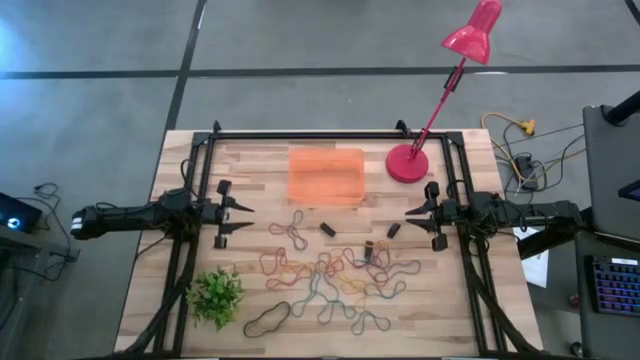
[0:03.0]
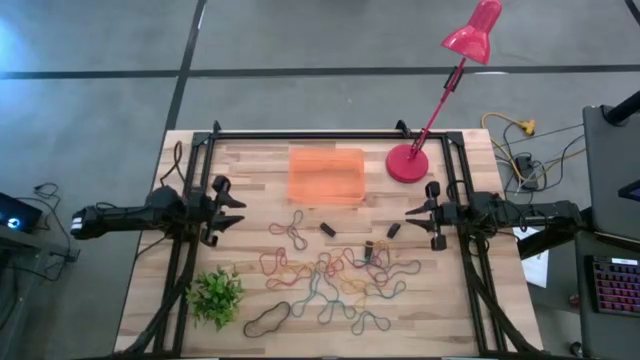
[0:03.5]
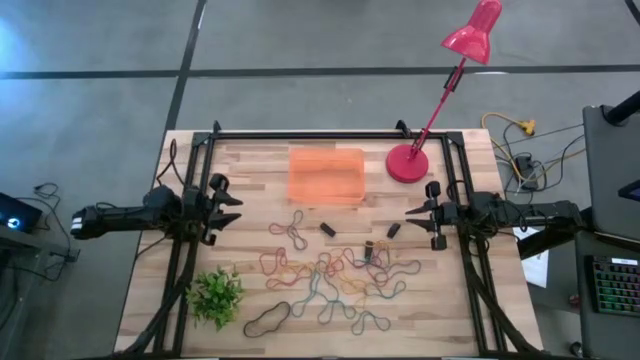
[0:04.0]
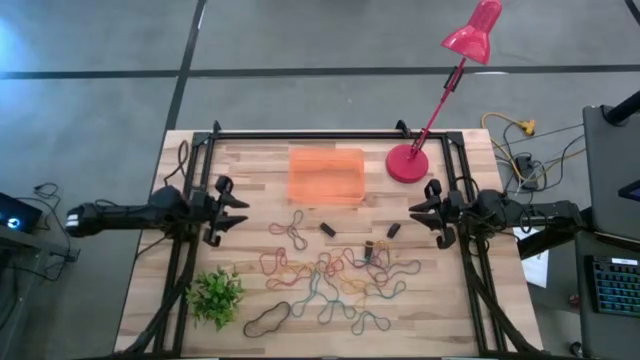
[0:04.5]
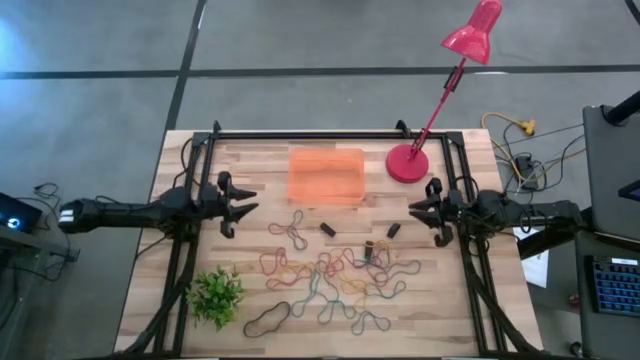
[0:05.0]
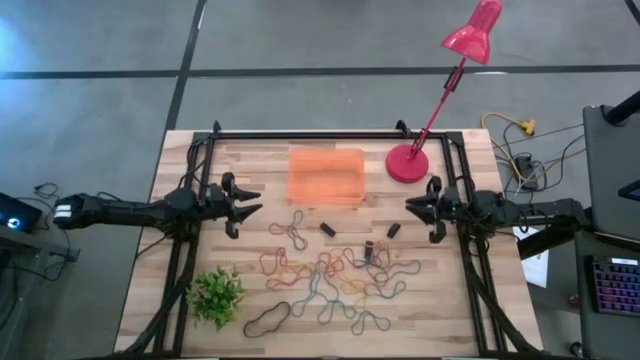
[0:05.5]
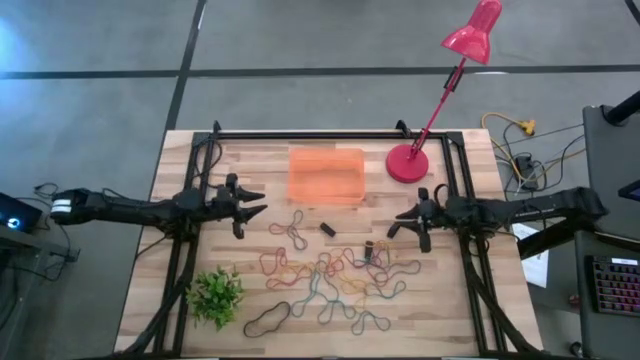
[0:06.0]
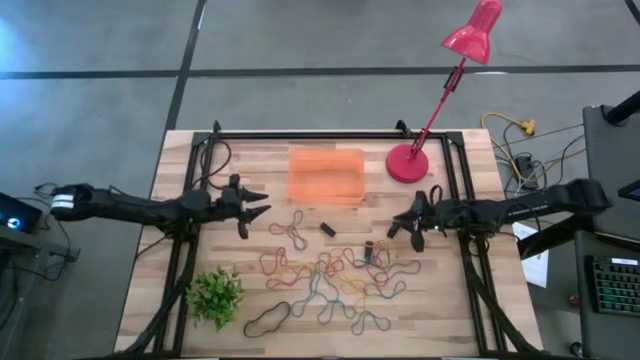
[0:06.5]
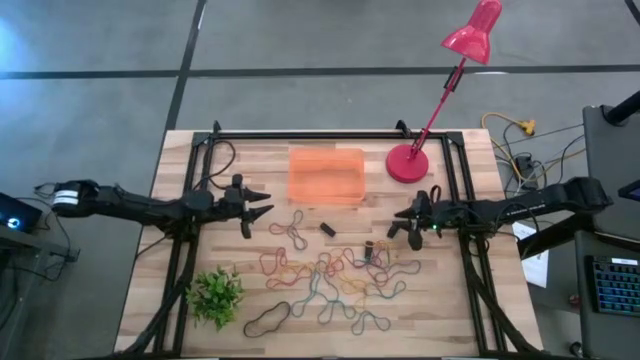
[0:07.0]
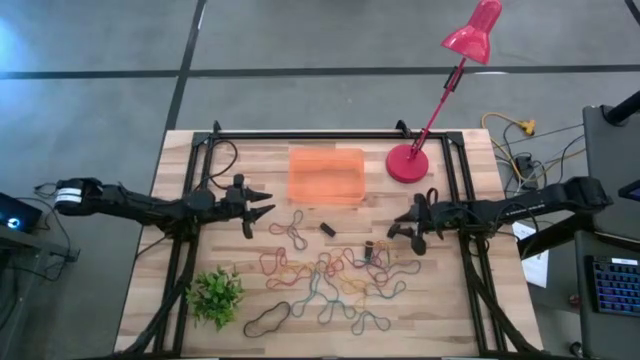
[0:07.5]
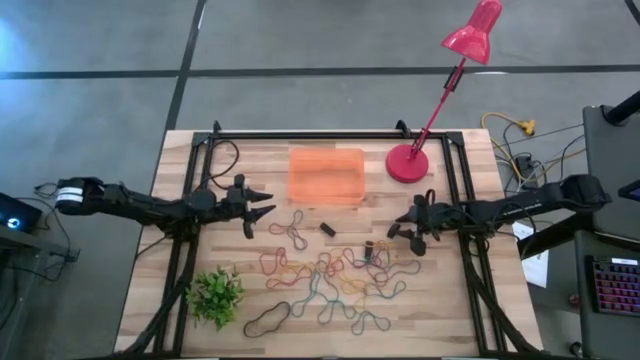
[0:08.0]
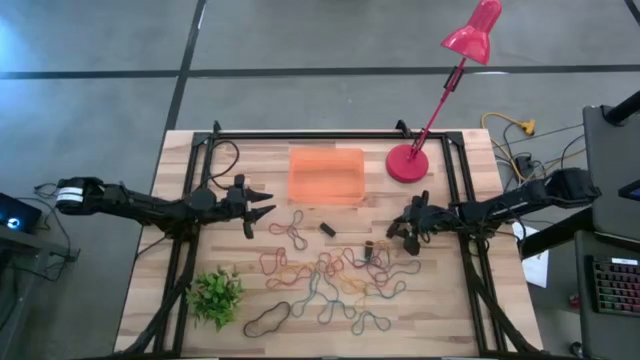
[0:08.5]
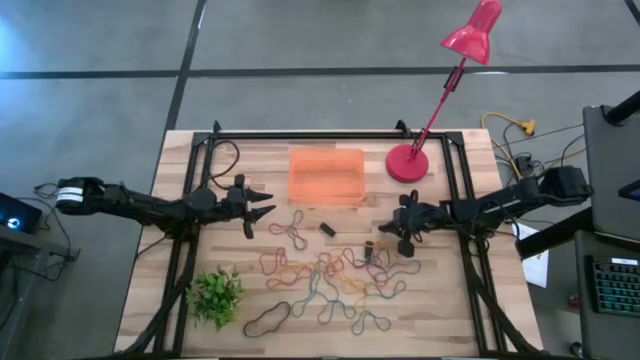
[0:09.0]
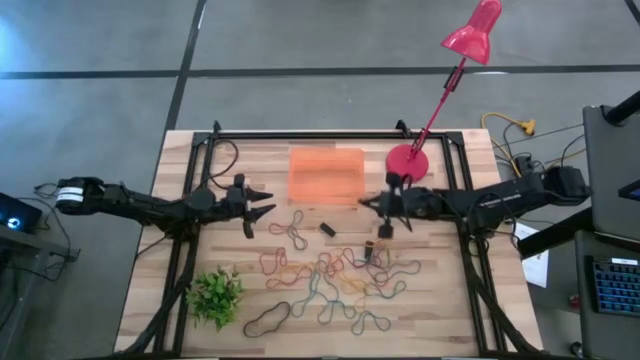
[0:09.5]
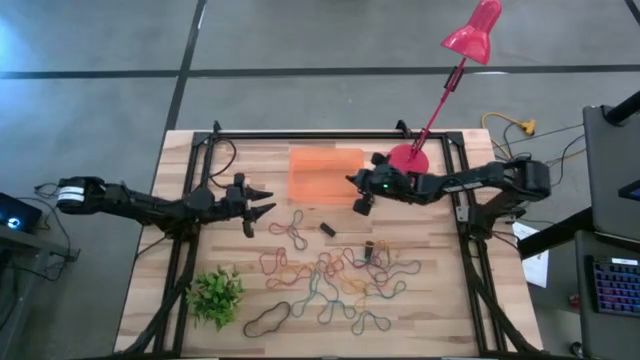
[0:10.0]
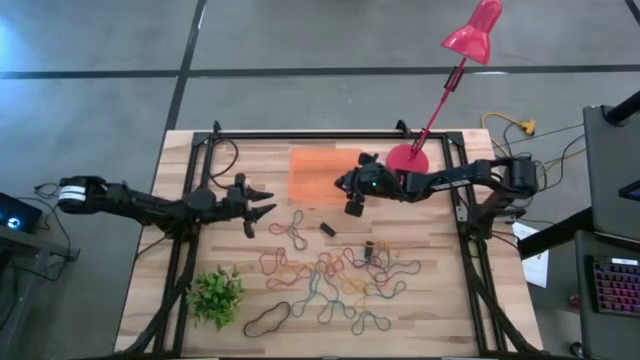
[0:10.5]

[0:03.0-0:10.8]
Task: Pick and place rubber bands into bin
Put the black rubber band into the orange bin

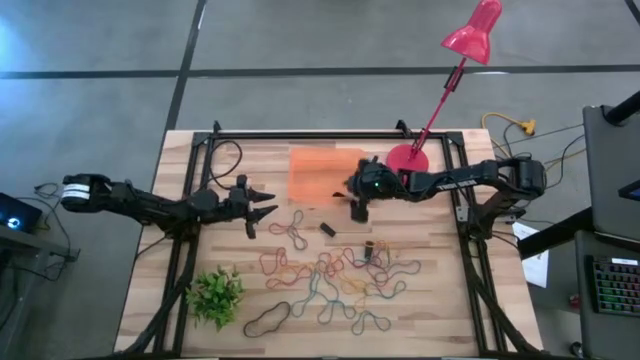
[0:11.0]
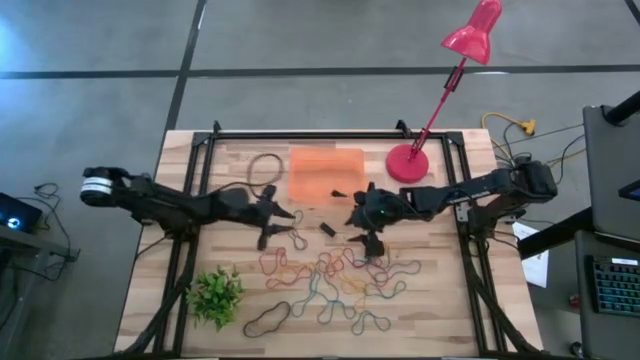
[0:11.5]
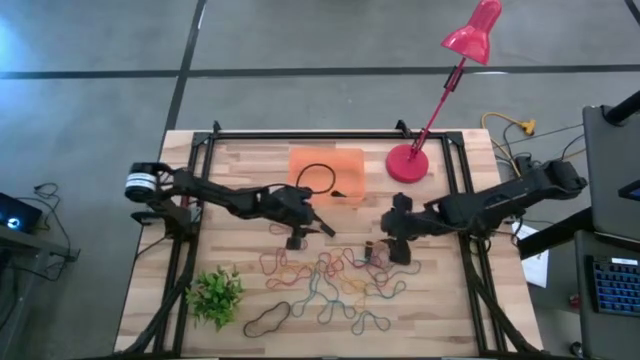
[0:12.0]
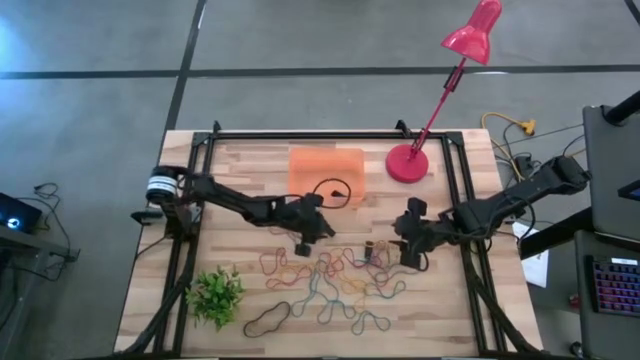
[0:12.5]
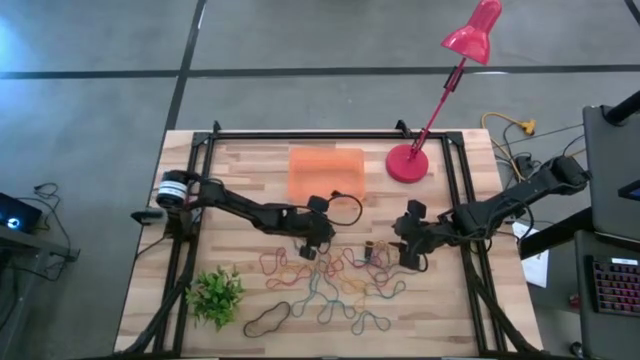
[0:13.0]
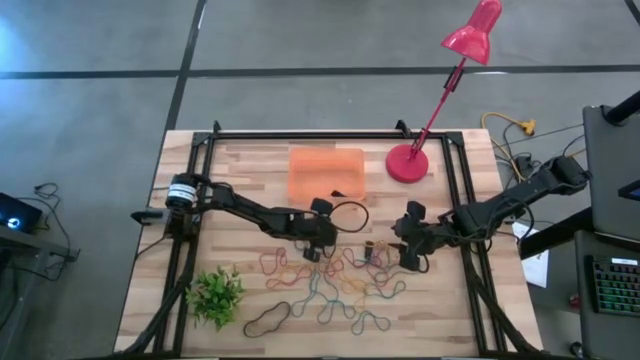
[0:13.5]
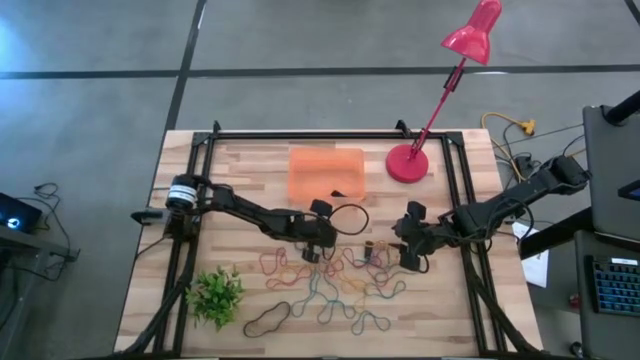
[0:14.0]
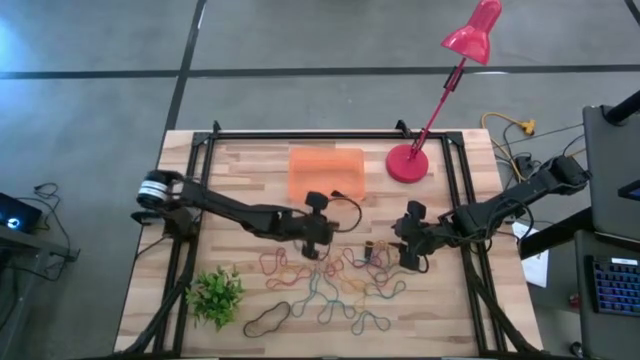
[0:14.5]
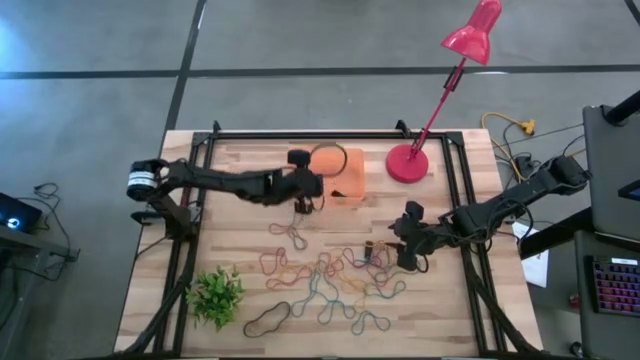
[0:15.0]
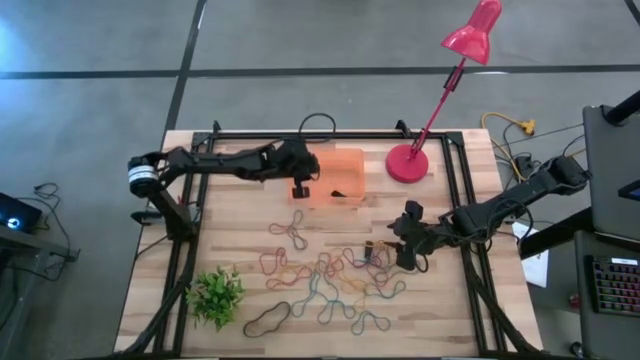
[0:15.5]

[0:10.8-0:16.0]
Put the black rubber band into the orange bin

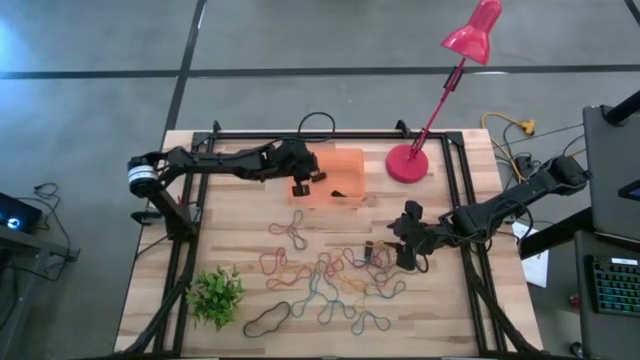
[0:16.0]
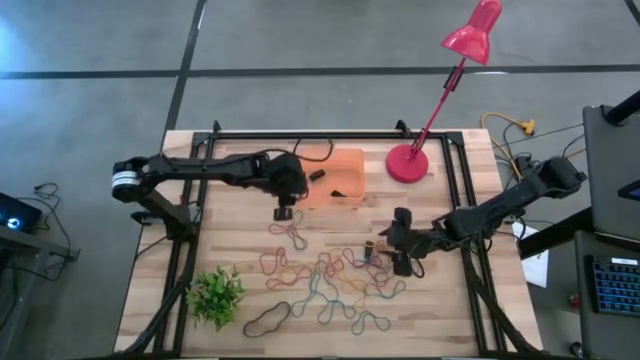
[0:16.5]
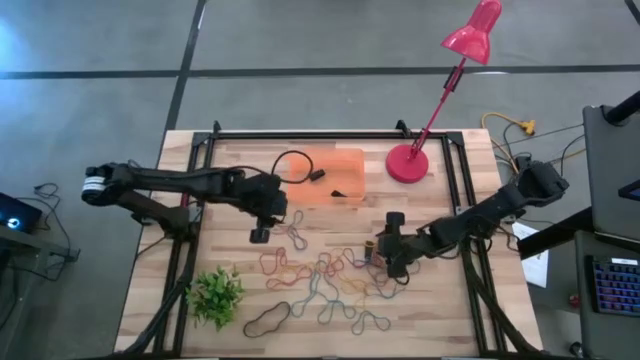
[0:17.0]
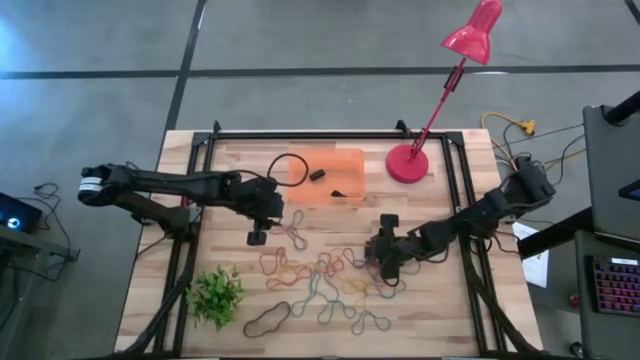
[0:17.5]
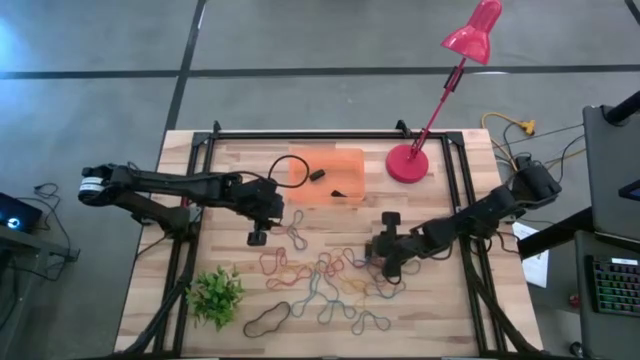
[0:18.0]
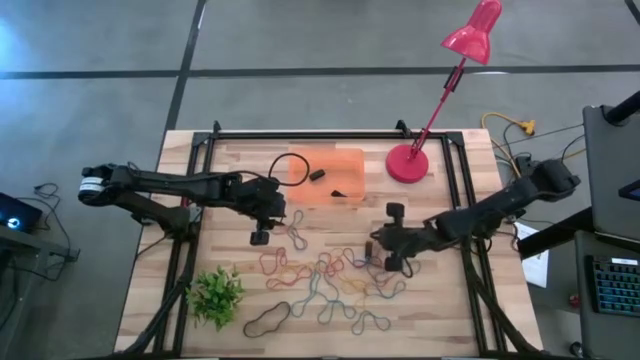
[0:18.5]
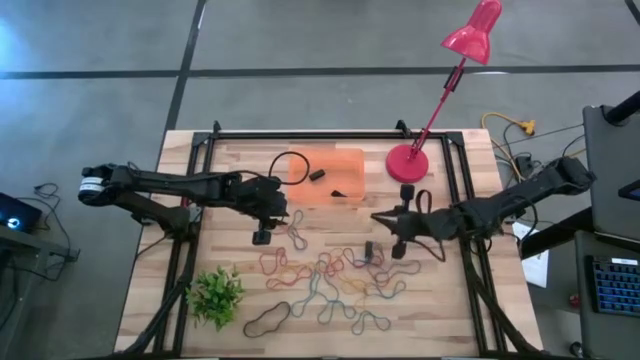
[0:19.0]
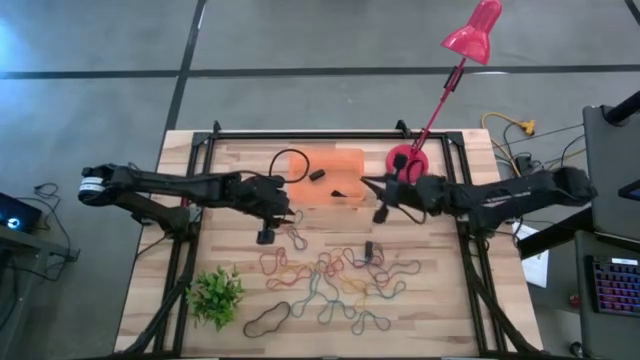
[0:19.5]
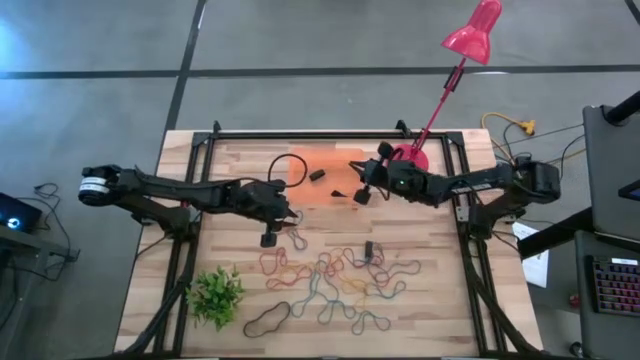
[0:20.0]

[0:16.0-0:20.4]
Put the yellow rubber band into the orange bin

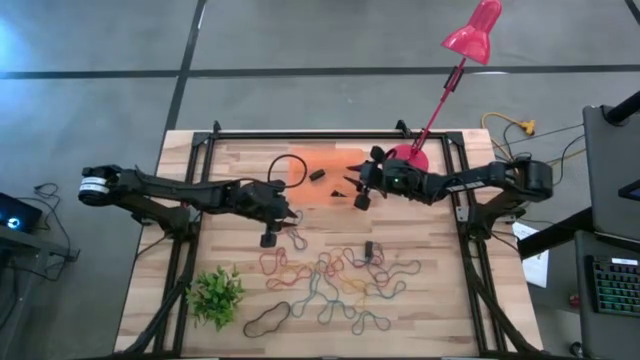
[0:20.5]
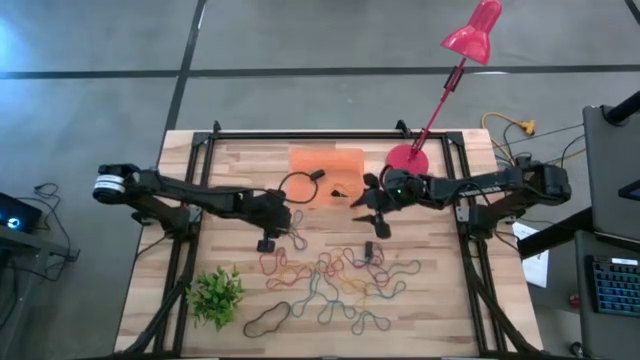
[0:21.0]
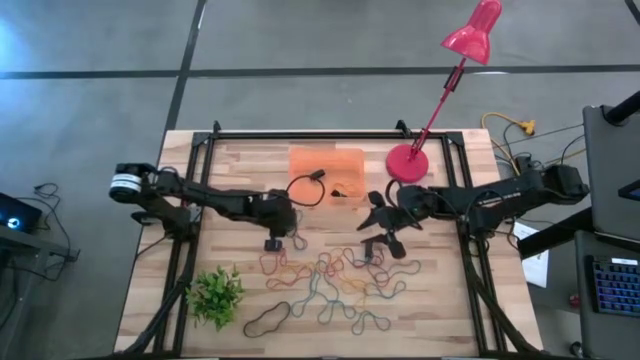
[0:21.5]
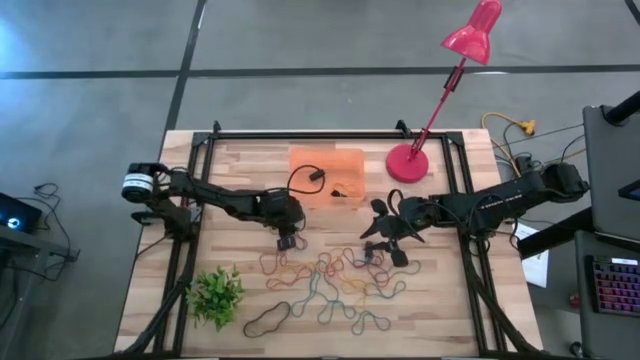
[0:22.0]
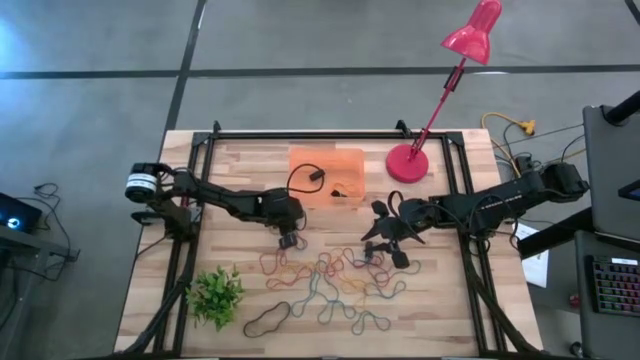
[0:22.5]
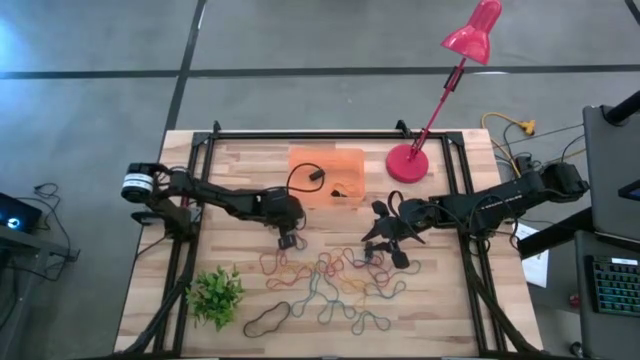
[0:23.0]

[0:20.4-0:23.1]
Put the blue rubber band into the orange bin
